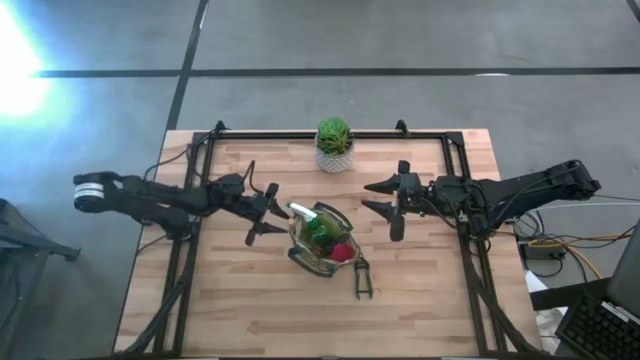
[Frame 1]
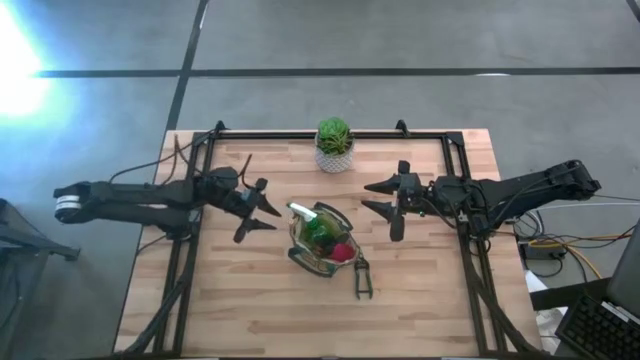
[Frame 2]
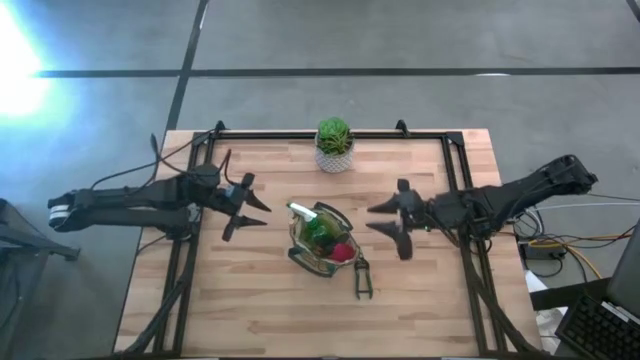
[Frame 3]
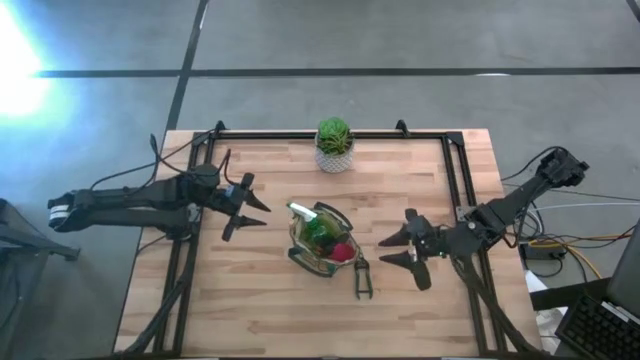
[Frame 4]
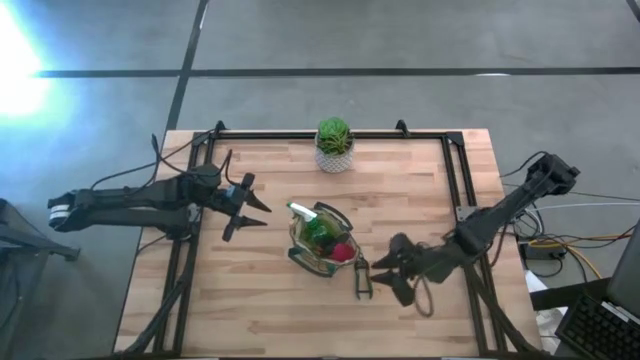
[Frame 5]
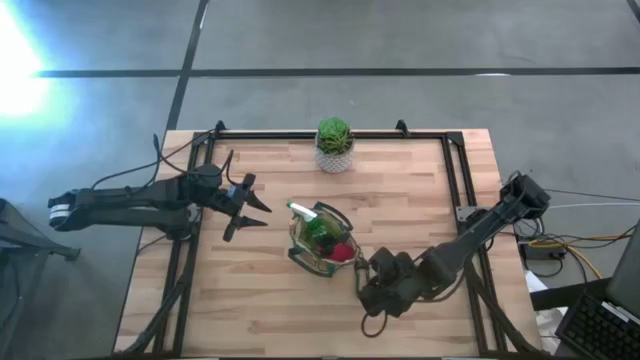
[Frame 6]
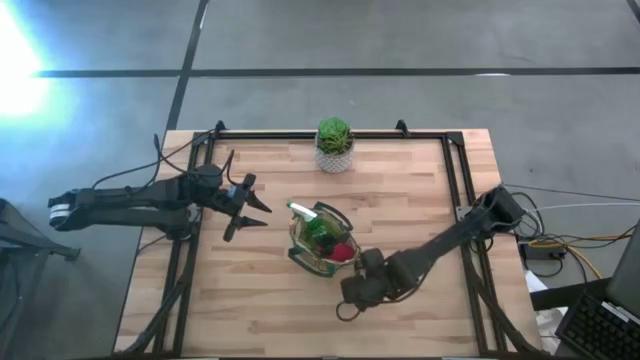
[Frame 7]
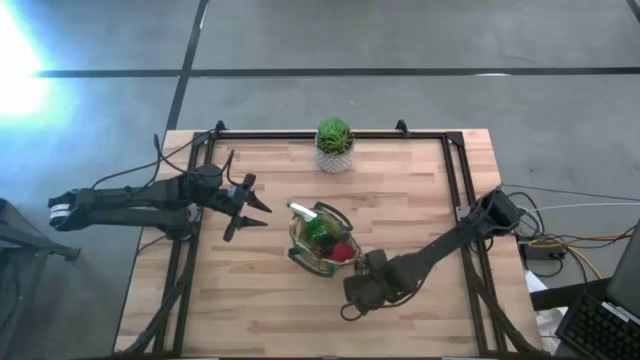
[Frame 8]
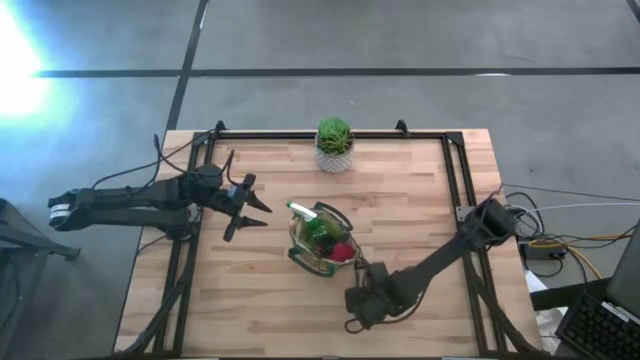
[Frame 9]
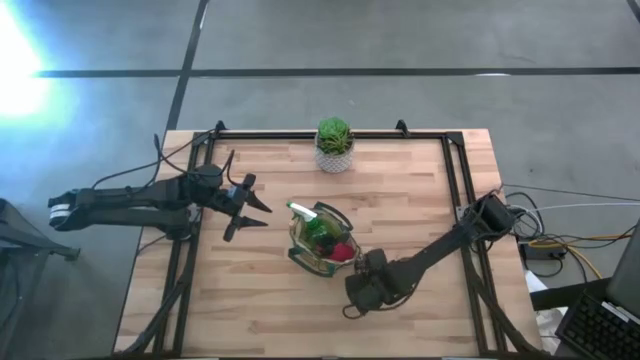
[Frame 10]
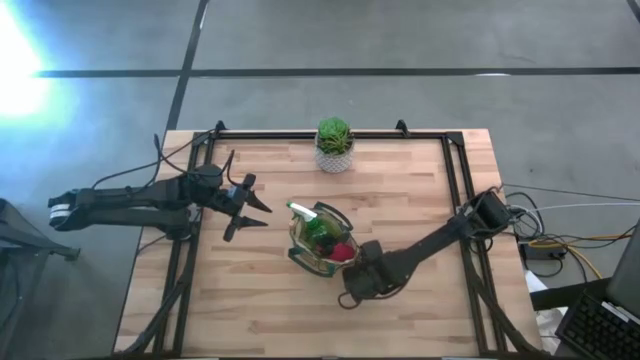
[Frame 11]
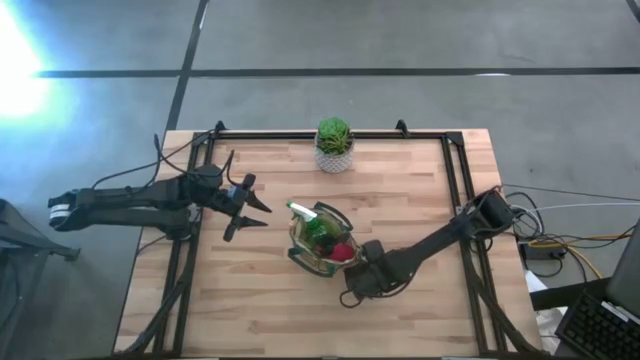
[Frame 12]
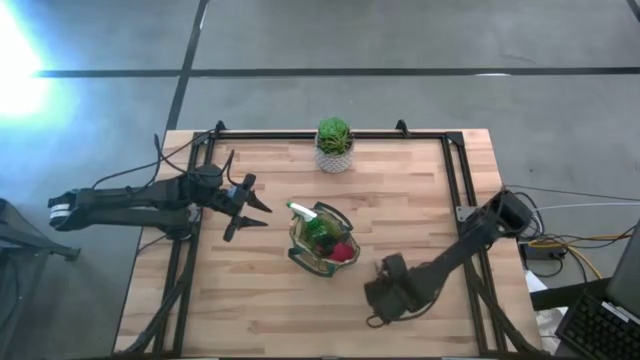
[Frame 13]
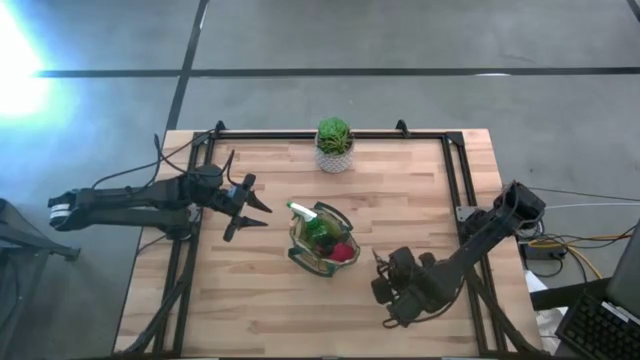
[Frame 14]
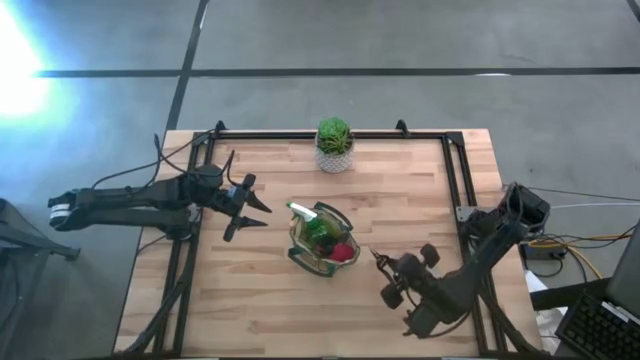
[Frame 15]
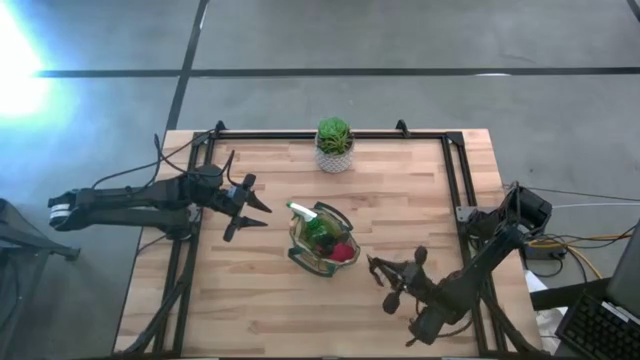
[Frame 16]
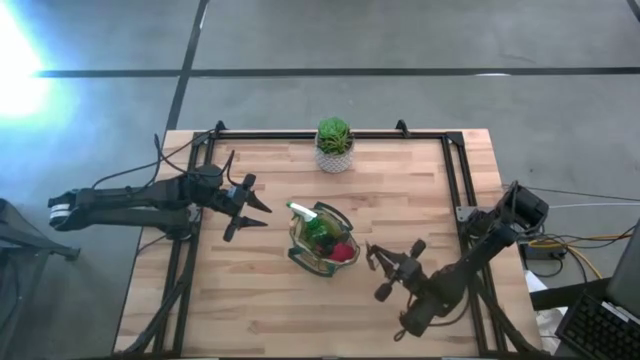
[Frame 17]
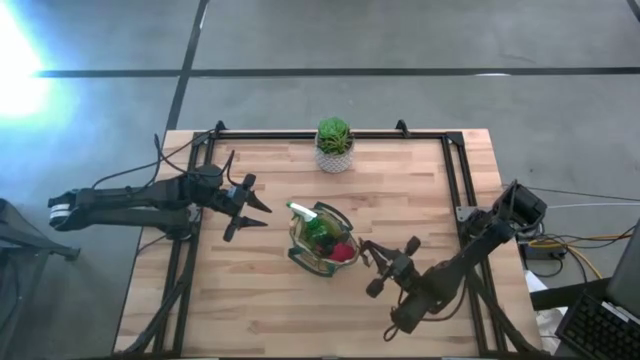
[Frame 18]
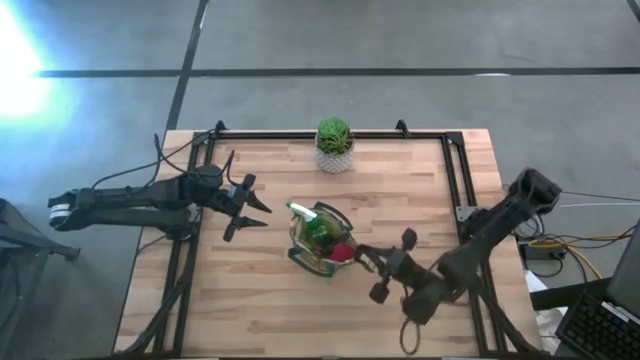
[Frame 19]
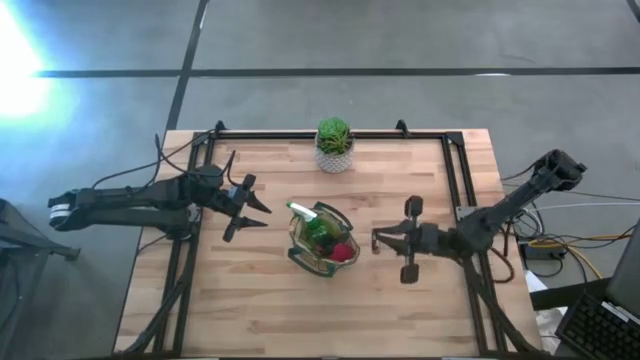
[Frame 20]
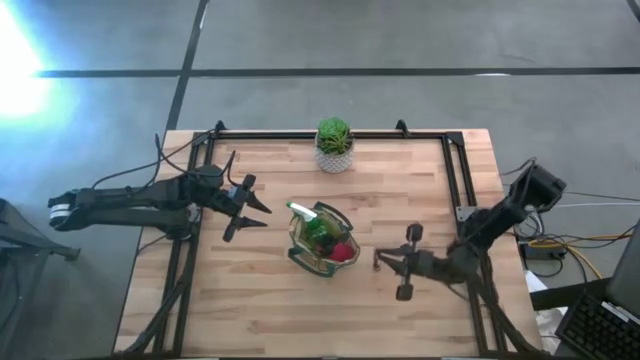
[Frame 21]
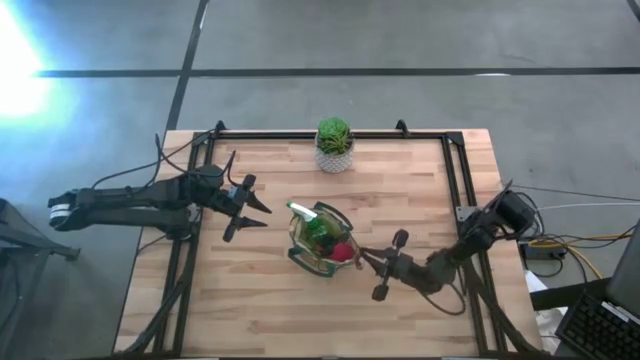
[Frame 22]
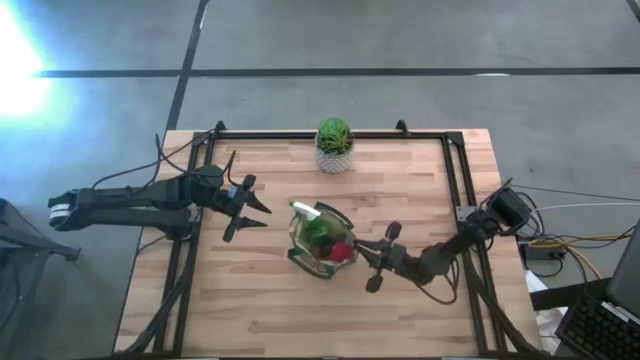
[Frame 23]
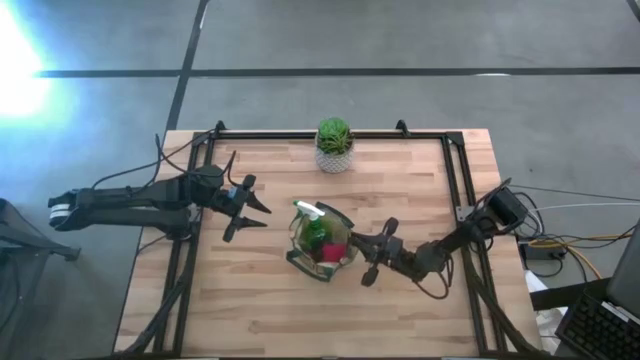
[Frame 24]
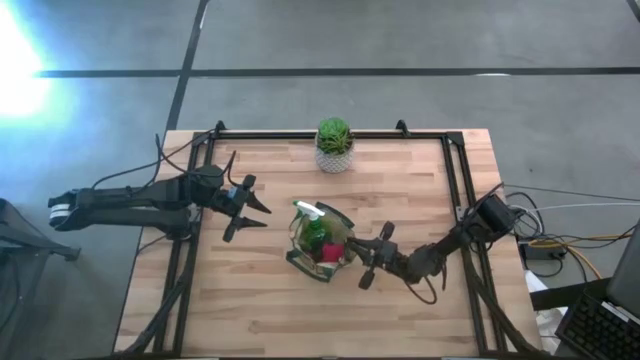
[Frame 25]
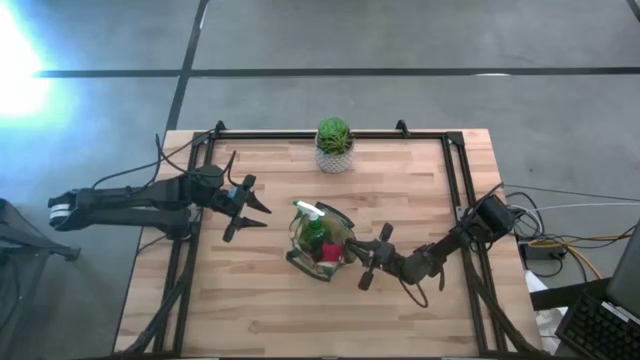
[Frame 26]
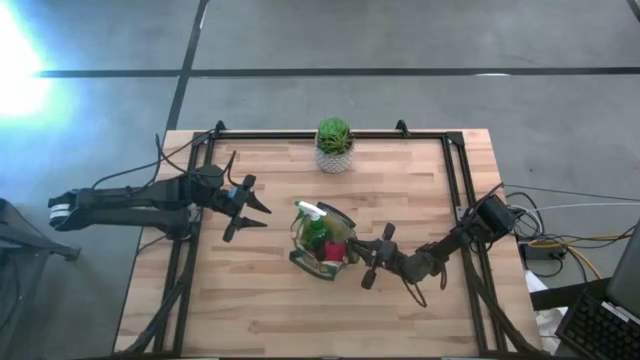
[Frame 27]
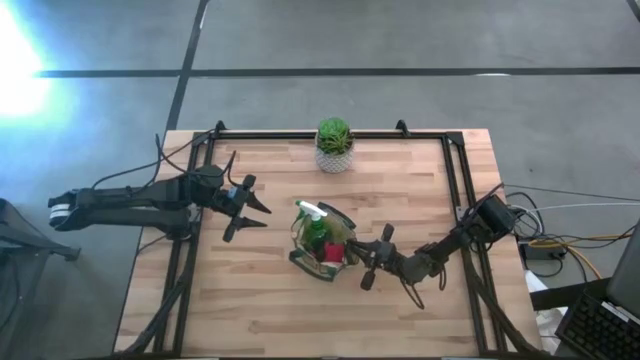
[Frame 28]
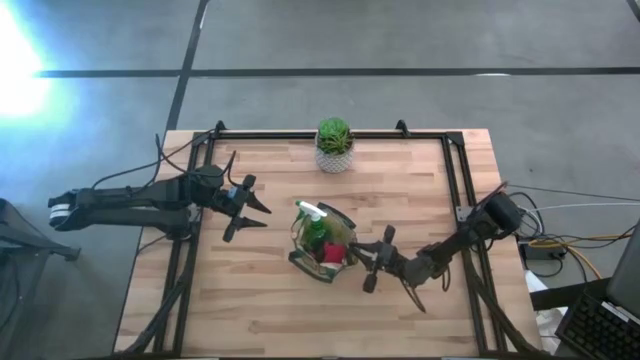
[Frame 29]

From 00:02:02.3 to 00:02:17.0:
Task: Pick & Place Garden tools in Gardening bag
Put the green shear scissors into the white gardening bag

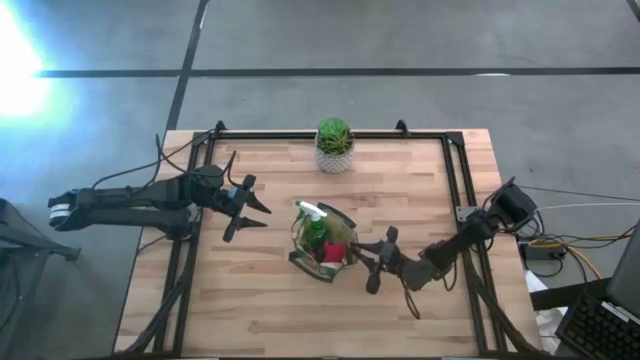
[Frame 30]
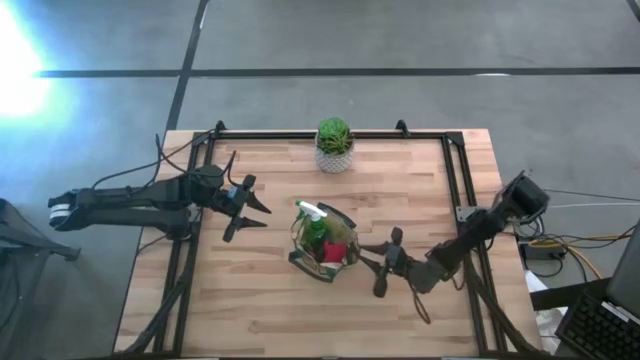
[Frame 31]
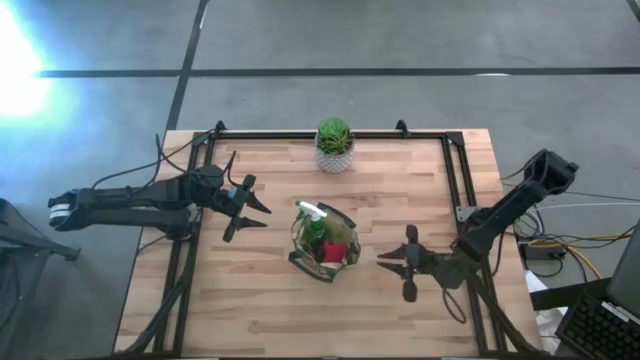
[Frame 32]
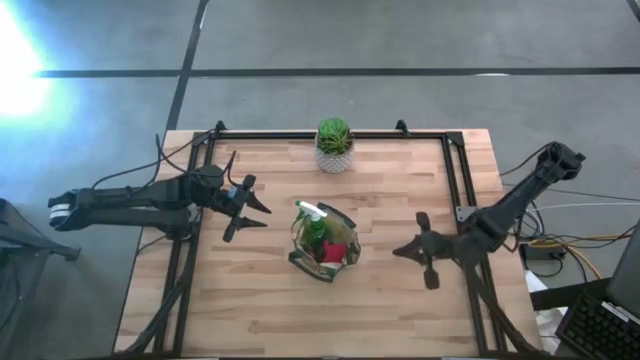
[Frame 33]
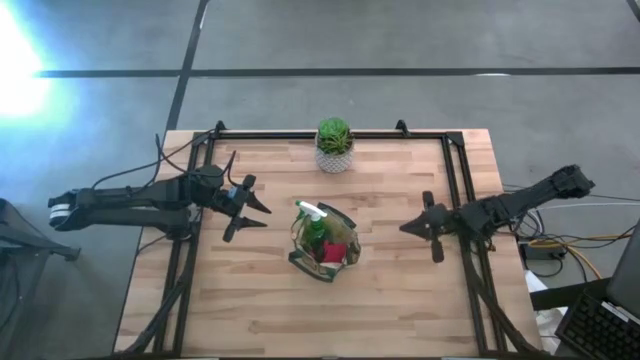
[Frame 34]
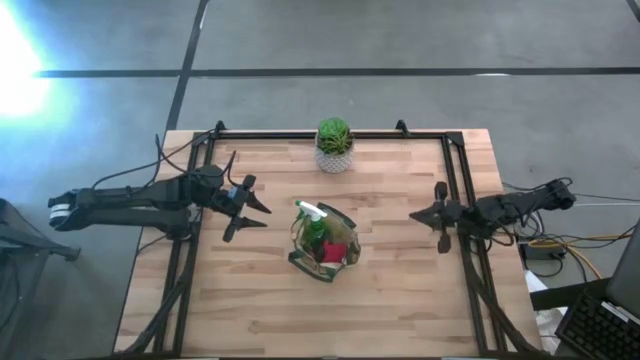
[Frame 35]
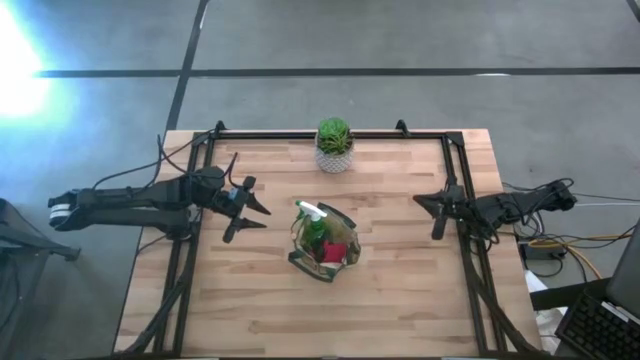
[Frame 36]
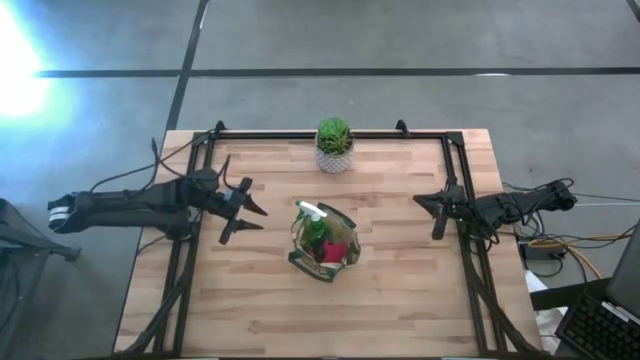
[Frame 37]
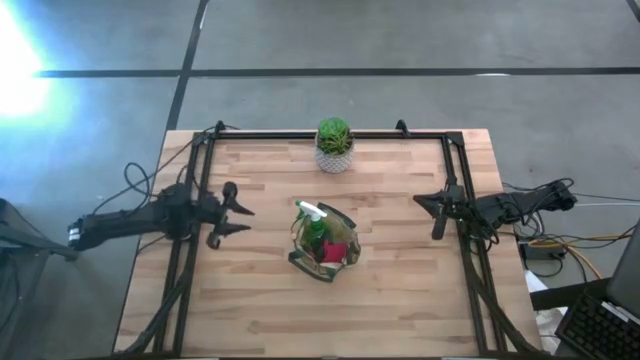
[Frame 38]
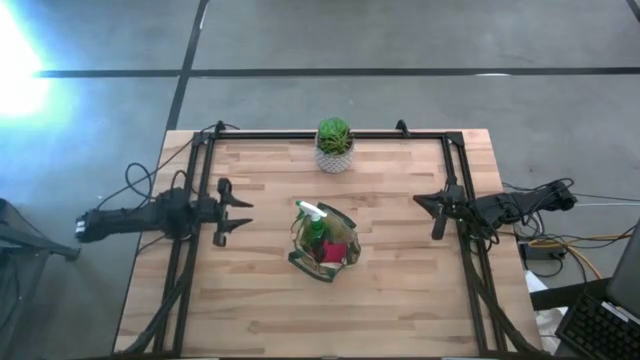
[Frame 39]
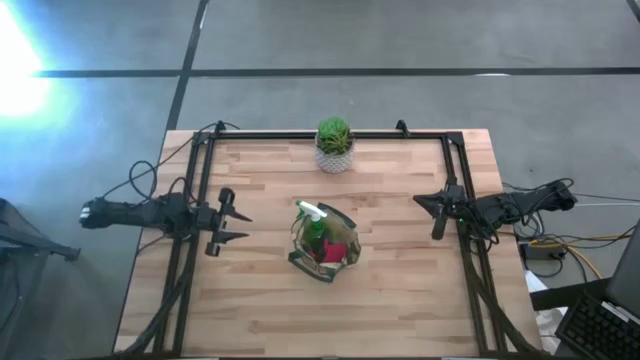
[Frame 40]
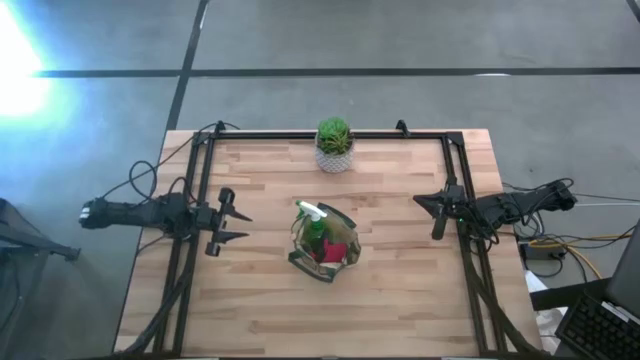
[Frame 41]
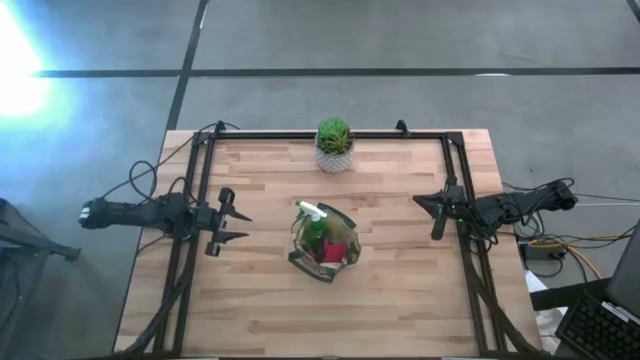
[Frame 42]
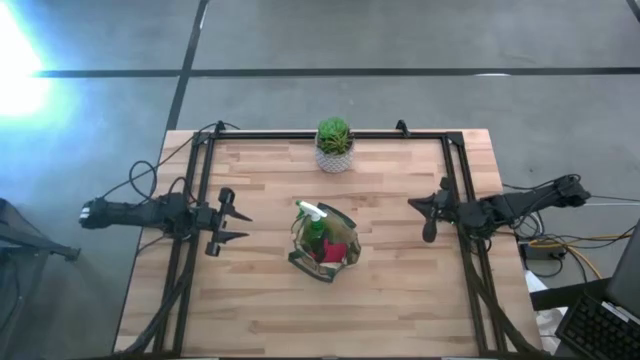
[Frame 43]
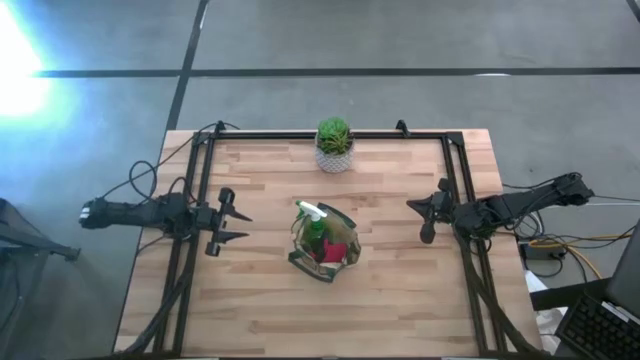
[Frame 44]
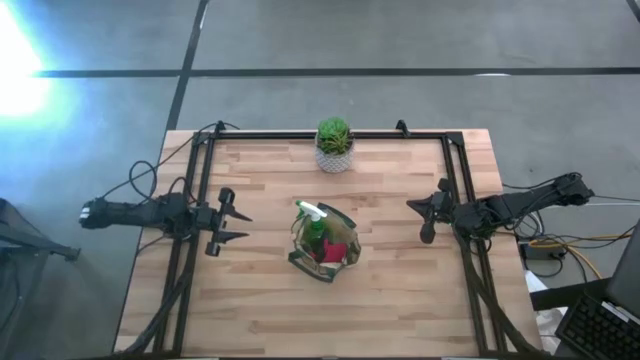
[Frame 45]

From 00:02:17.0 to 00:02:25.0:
Return to Home Position
